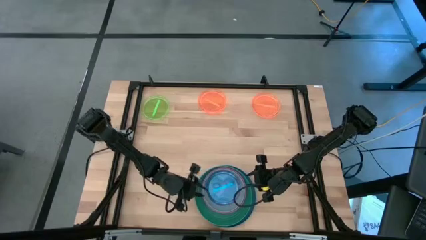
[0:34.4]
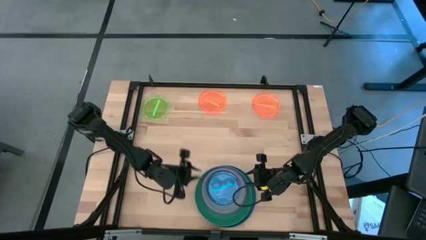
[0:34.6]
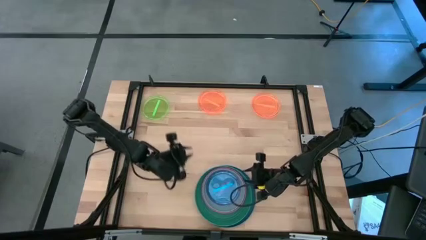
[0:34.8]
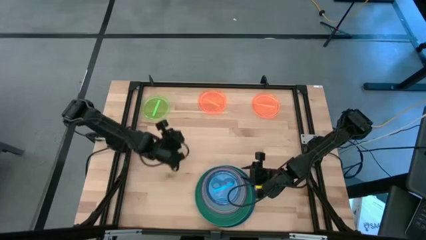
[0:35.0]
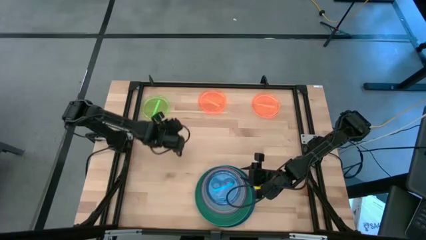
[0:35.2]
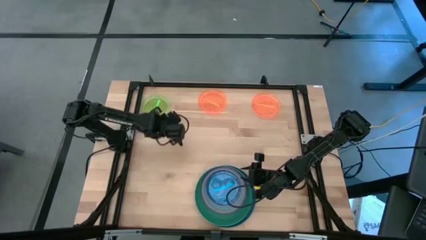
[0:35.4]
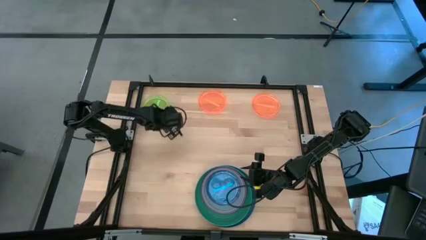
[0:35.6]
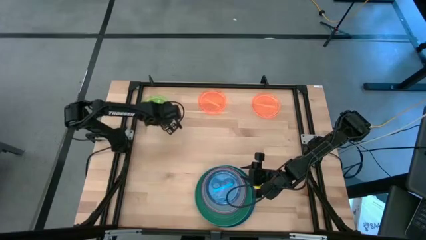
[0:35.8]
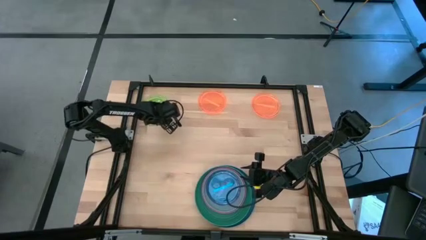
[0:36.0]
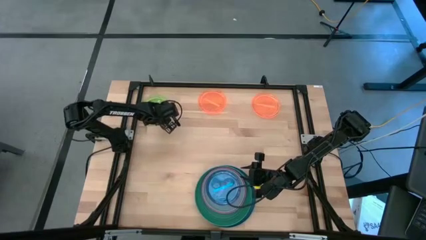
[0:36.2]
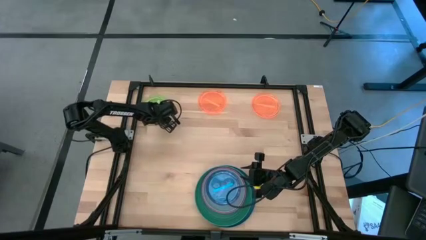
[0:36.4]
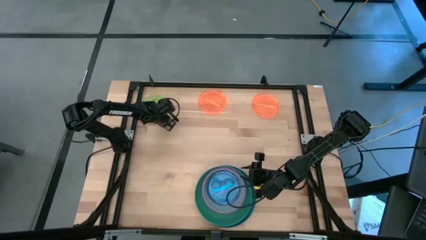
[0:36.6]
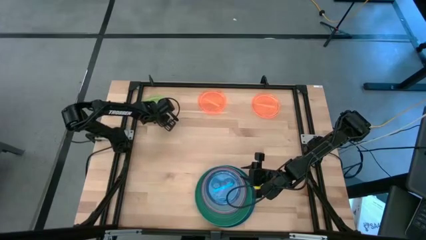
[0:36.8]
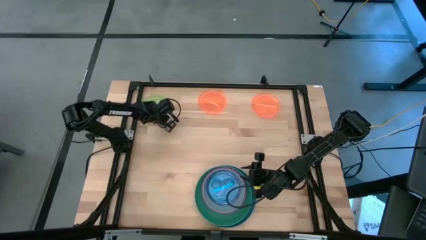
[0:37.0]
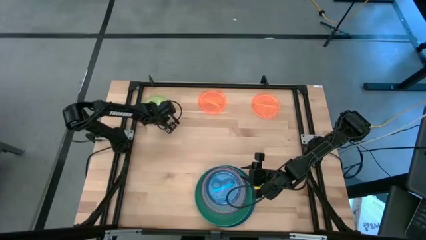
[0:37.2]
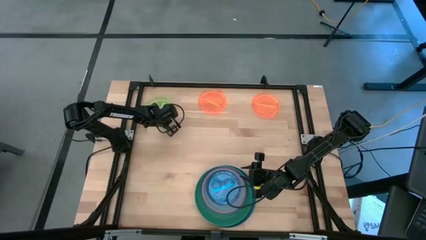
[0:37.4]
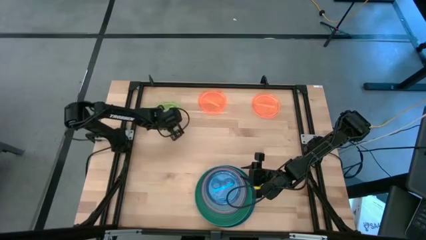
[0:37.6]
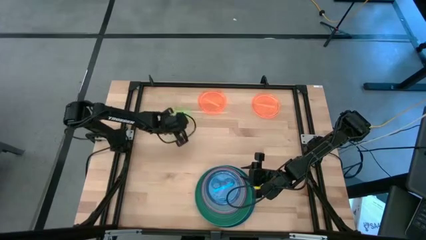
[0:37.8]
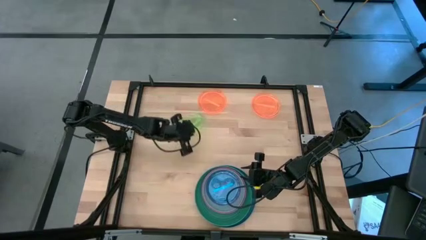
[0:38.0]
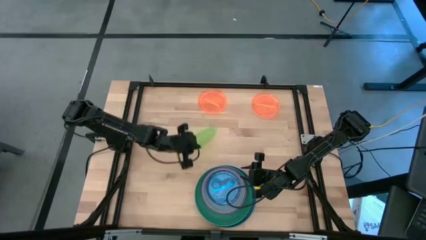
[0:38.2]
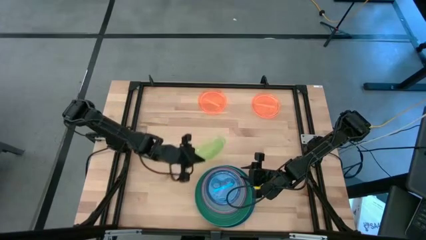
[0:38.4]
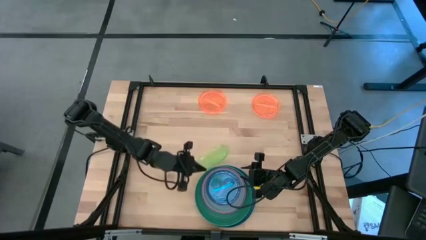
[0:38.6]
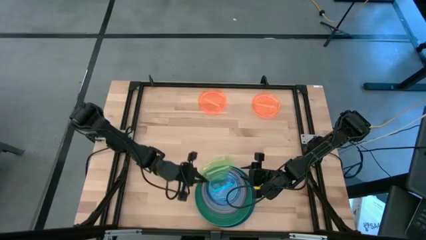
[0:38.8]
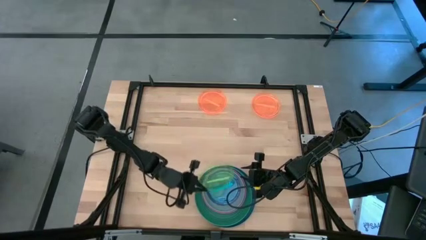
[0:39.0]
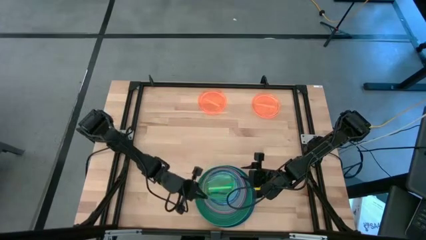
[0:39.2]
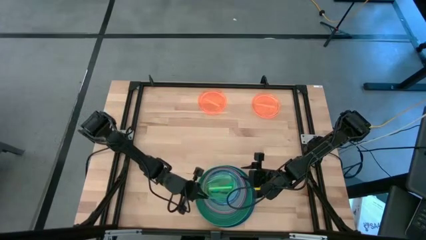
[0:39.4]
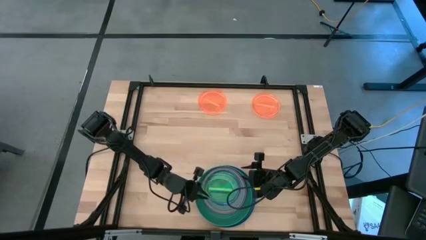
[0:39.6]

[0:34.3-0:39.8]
Task: Stack plastic plates
Stack the light green plate on top of the light blue plate

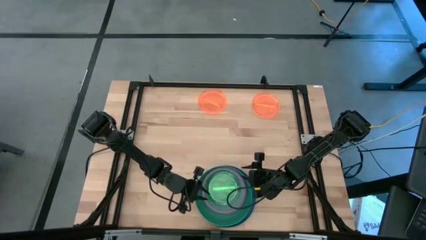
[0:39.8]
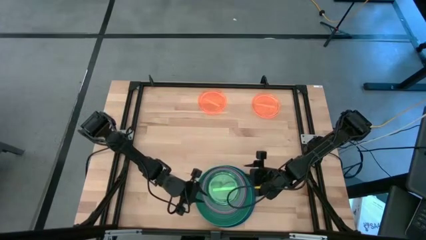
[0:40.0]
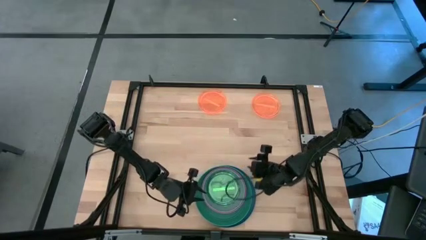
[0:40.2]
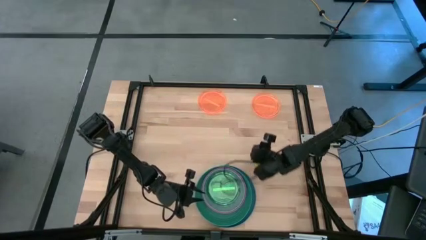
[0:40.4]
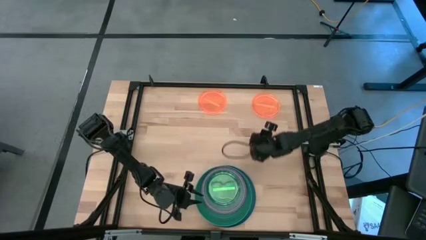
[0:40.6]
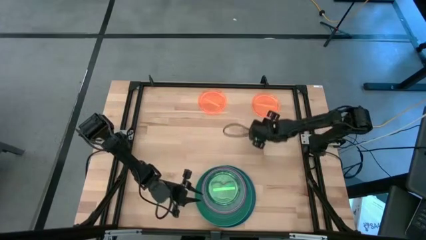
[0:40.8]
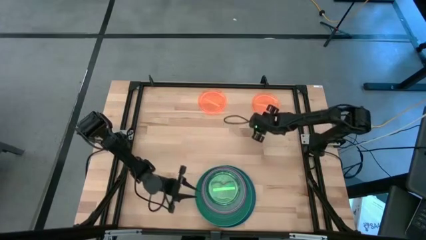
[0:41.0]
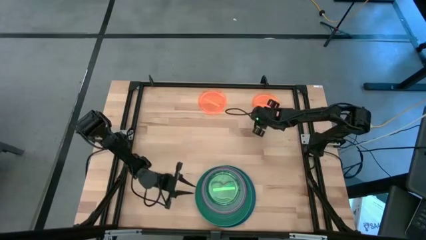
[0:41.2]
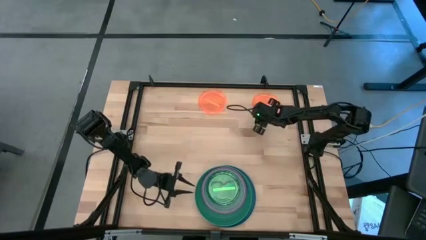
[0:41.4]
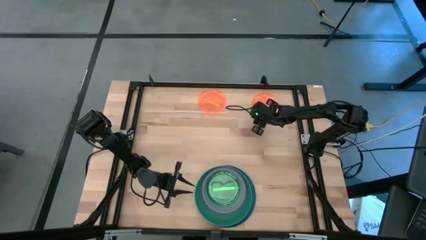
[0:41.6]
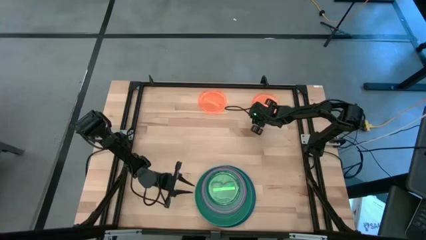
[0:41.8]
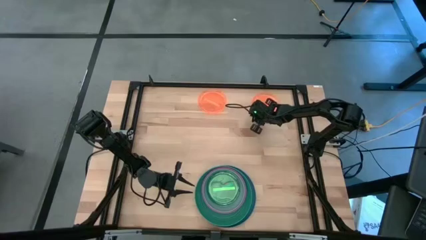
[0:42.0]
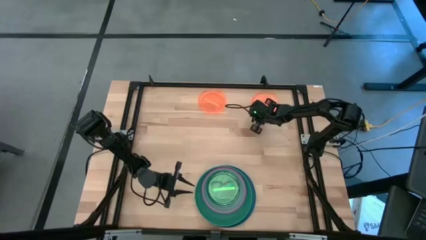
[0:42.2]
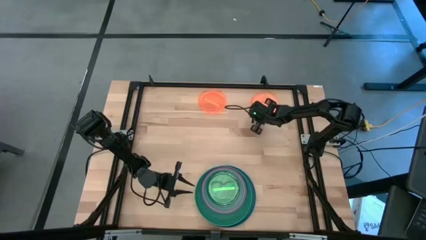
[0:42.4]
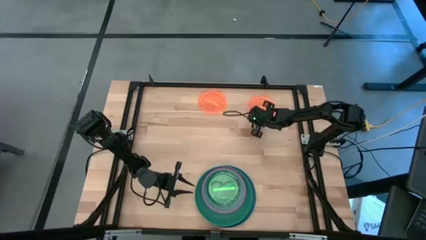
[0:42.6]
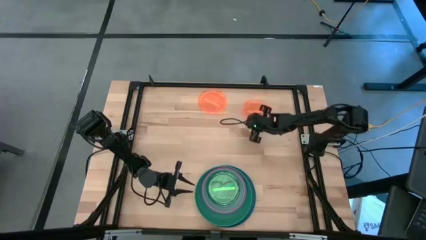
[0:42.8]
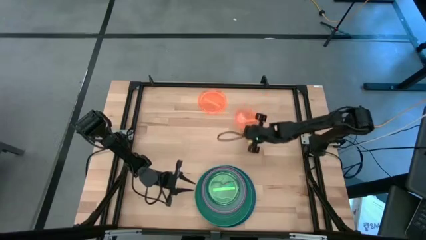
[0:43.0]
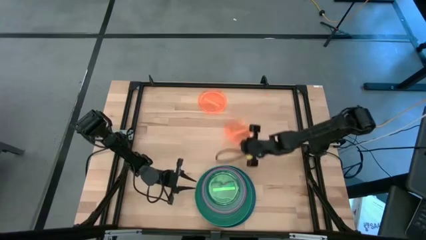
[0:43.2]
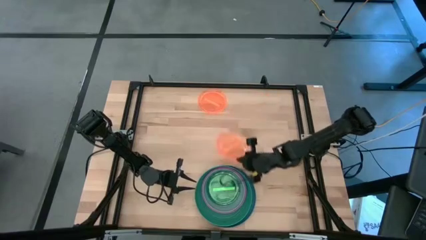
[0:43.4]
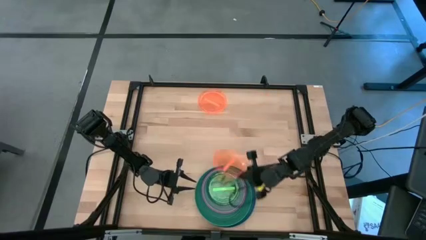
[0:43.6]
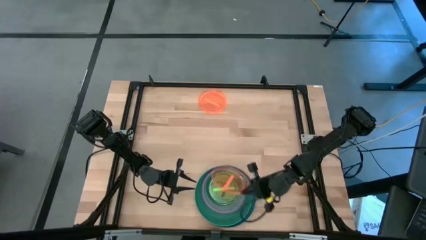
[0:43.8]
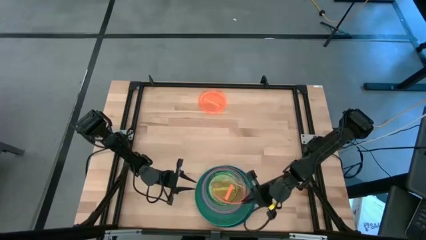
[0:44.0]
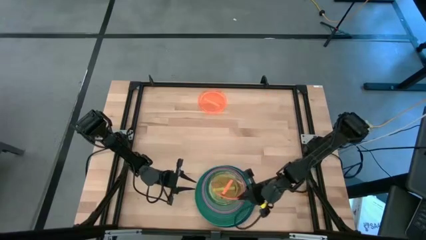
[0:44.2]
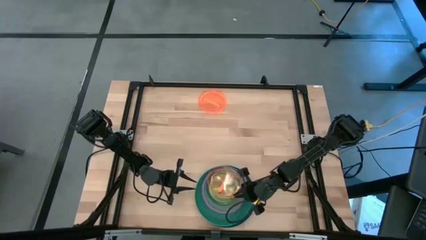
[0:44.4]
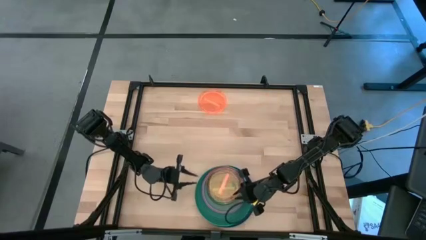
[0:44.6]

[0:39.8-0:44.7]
Stack the right orange plate on top of the light green plate

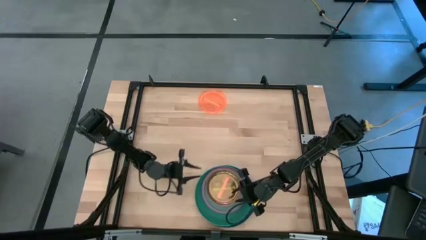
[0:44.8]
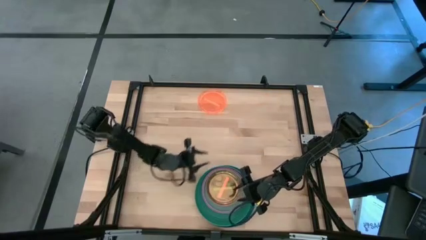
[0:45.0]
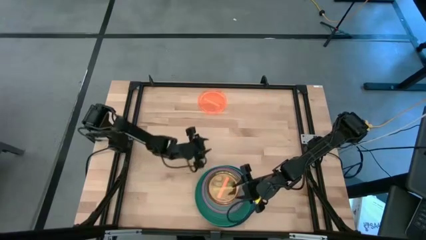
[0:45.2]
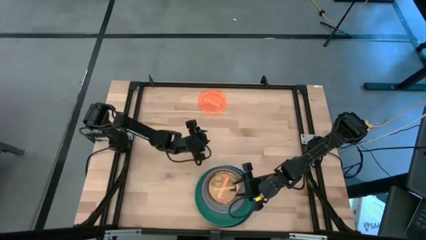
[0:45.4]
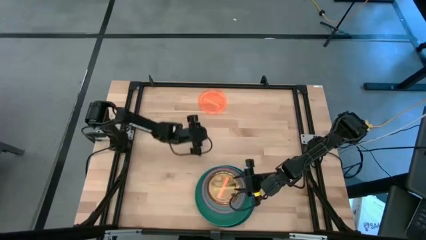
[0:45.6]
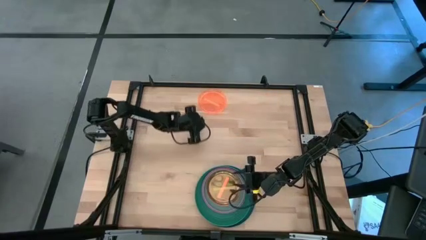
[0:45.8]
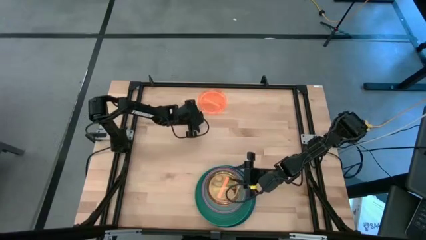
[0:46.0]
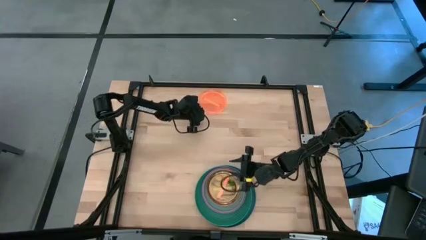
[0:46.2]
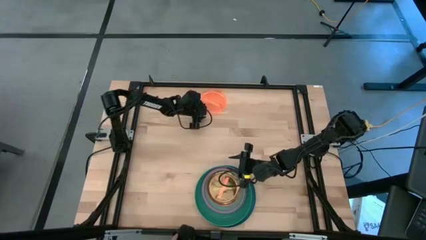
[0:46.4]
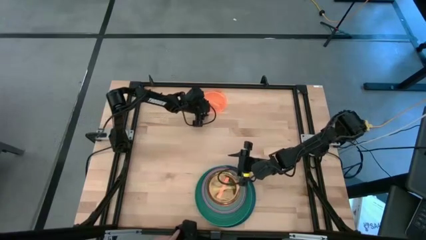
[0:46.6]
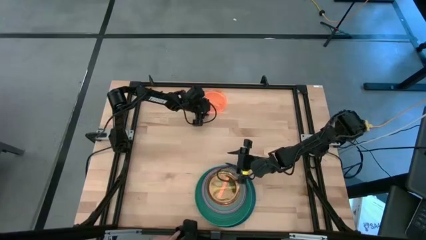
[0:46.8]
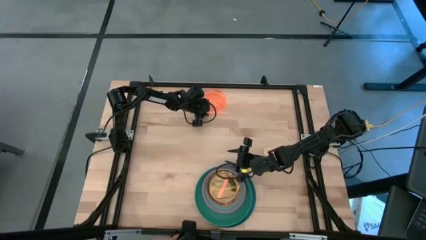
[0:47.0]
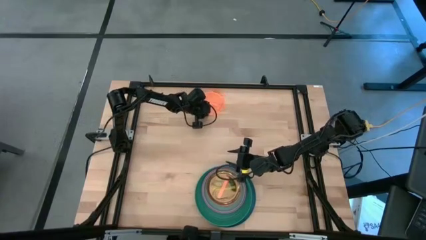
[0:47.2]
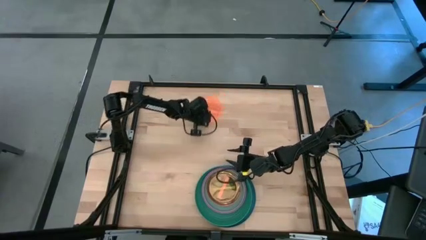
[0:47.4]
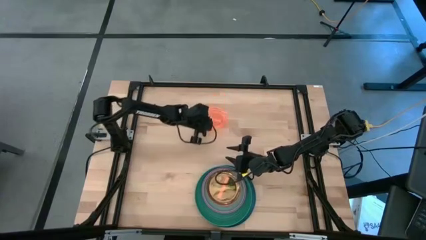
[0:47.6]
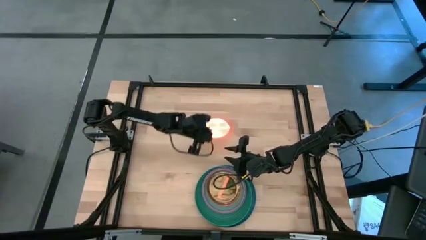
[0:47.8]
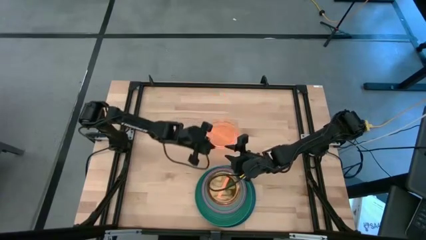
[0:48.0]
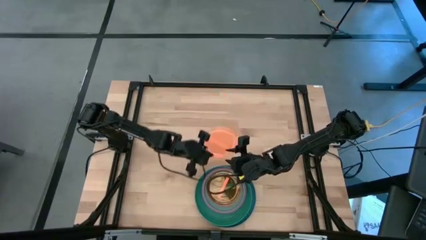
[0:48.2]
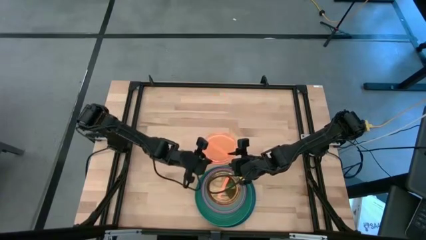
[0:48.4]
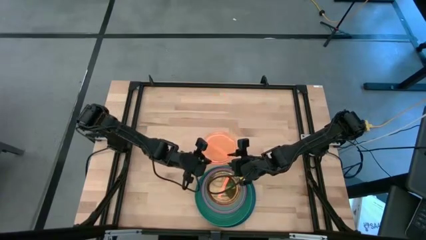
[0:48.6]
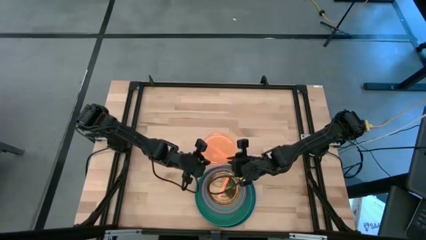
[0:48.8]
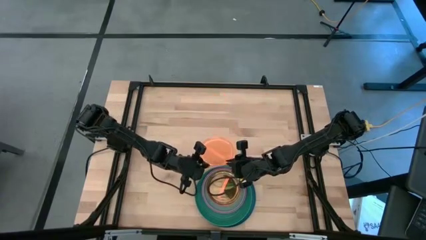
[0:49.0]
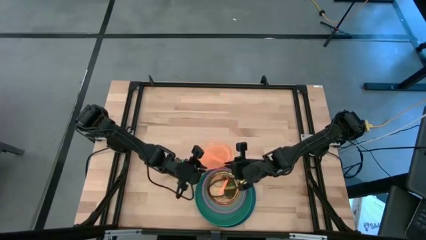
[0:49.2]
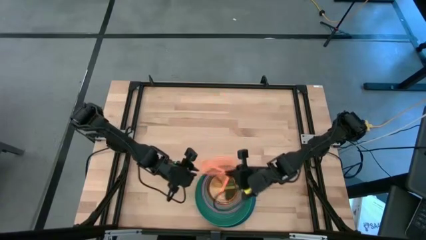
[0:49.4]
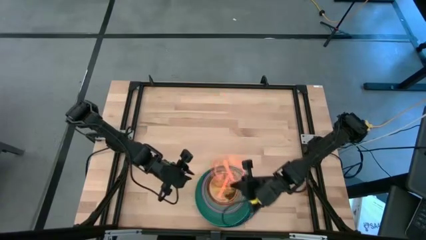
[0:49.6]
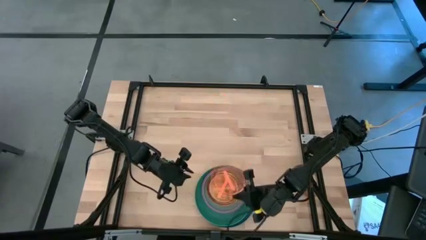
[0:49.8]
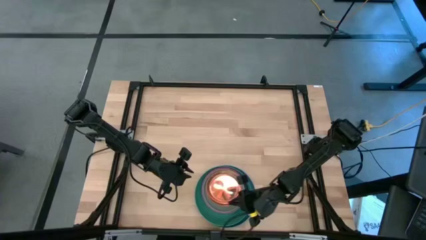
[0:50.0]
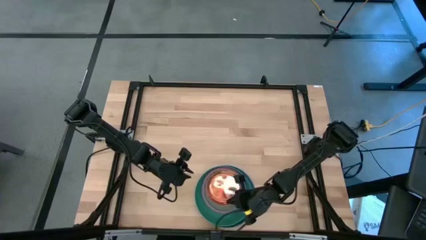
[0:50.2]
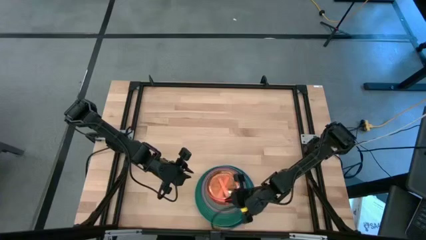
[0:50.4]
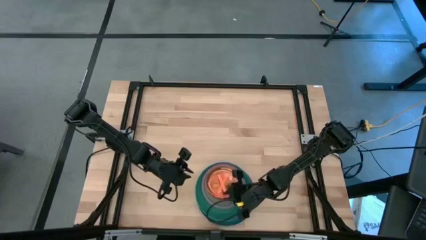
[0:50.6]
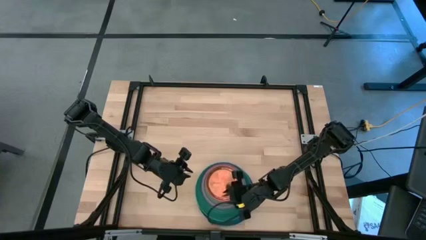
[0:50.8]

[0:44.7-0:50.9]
Stack the orange plate on top of the orange plate
